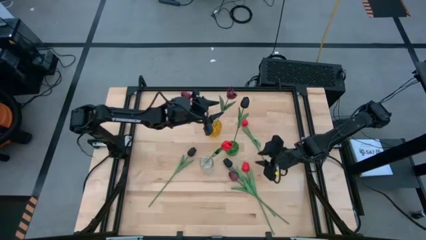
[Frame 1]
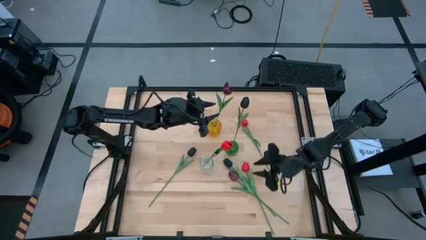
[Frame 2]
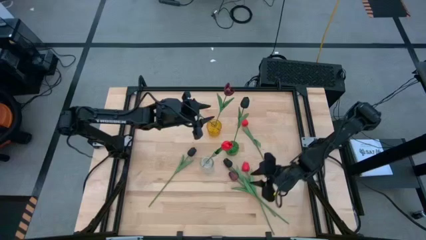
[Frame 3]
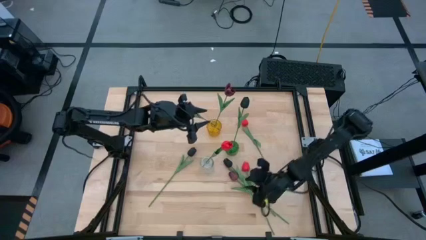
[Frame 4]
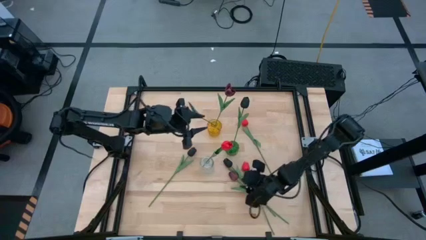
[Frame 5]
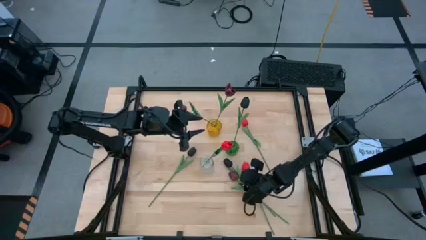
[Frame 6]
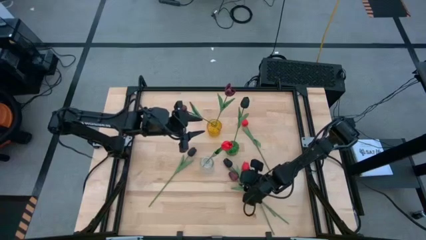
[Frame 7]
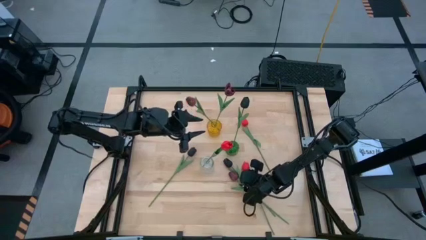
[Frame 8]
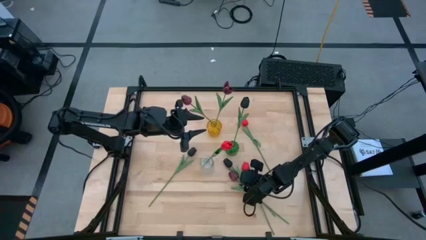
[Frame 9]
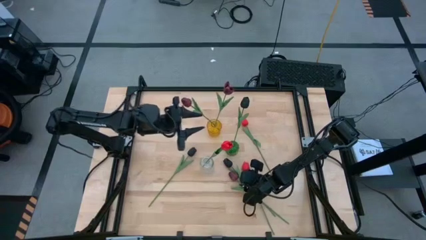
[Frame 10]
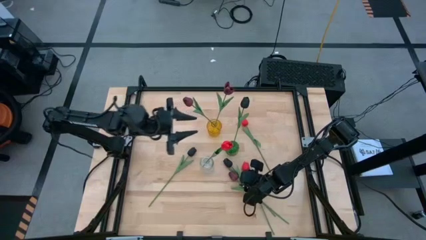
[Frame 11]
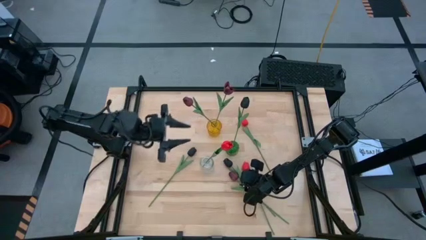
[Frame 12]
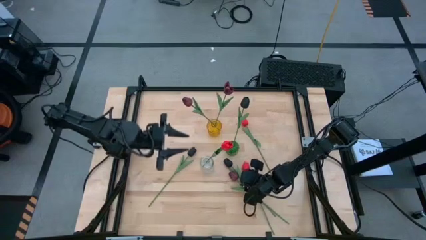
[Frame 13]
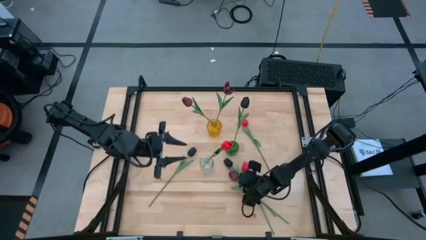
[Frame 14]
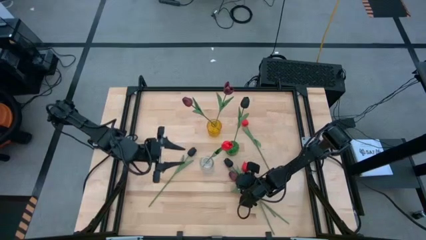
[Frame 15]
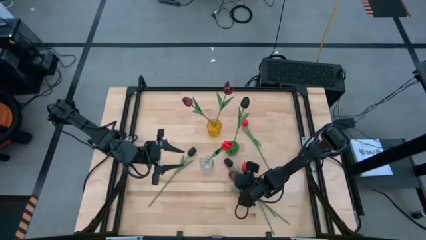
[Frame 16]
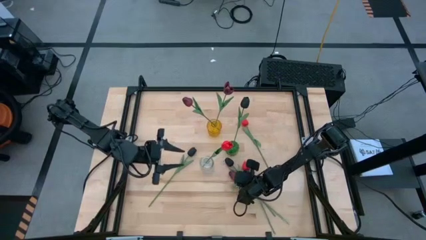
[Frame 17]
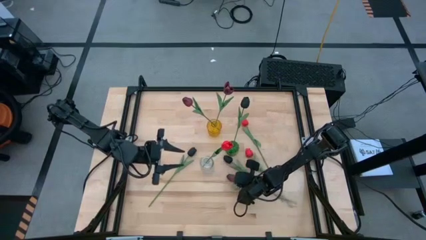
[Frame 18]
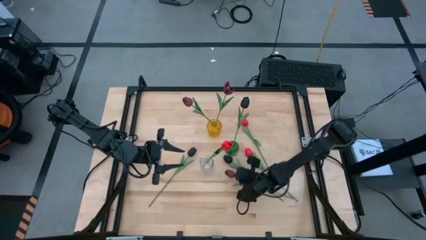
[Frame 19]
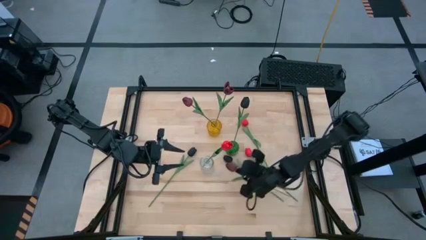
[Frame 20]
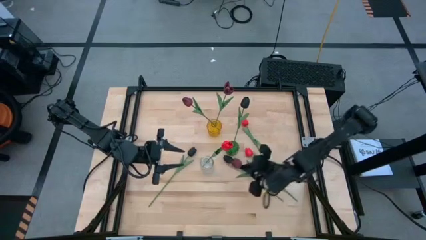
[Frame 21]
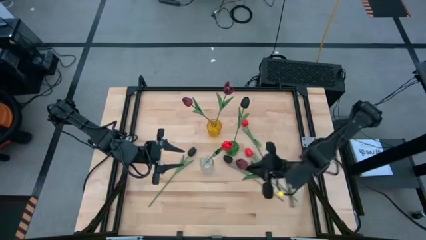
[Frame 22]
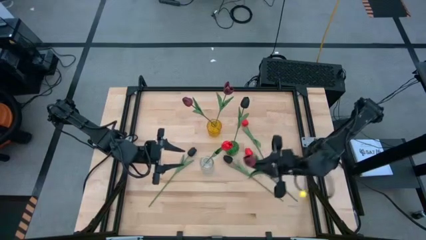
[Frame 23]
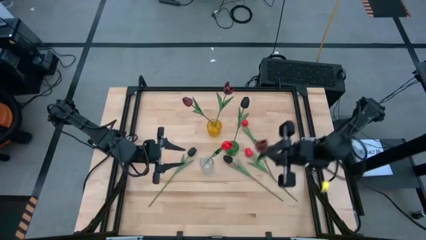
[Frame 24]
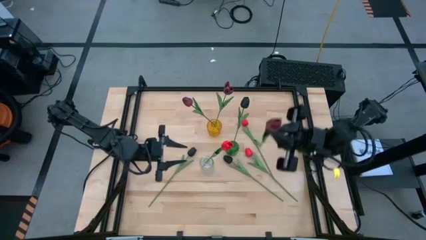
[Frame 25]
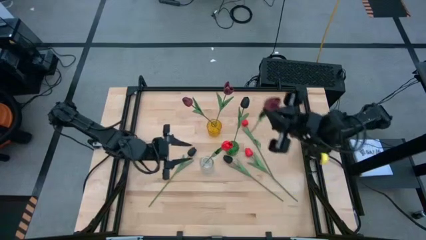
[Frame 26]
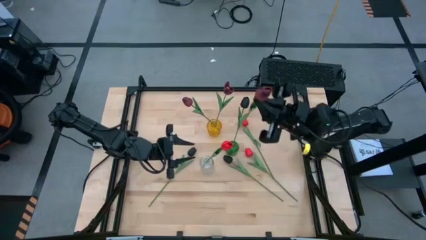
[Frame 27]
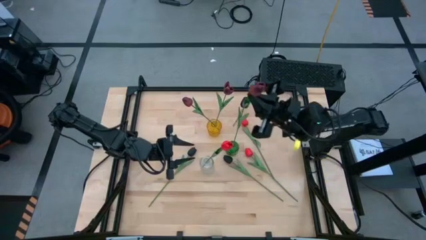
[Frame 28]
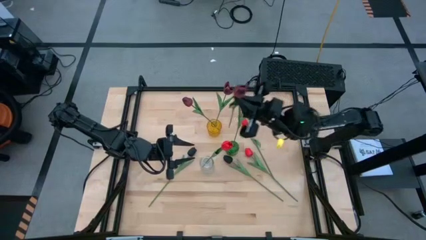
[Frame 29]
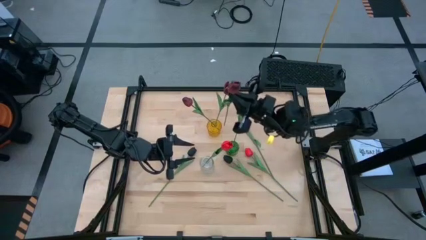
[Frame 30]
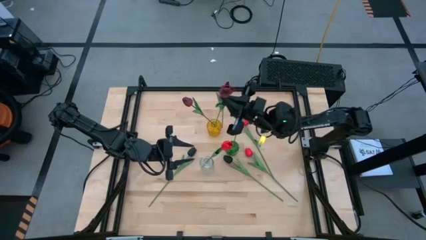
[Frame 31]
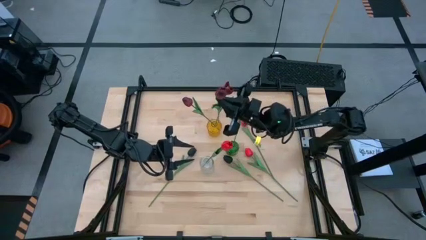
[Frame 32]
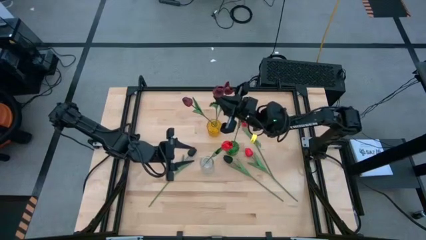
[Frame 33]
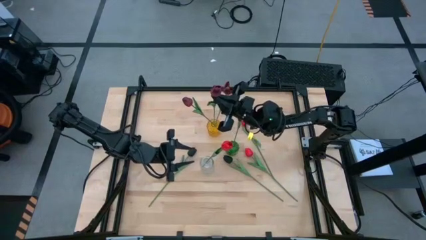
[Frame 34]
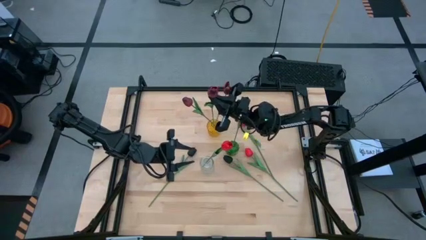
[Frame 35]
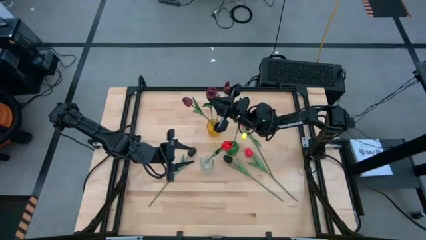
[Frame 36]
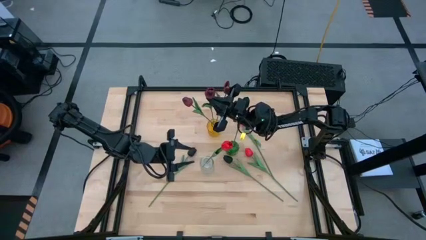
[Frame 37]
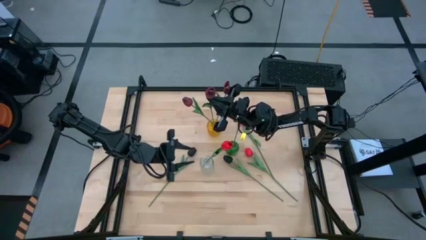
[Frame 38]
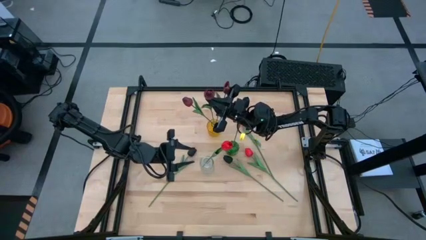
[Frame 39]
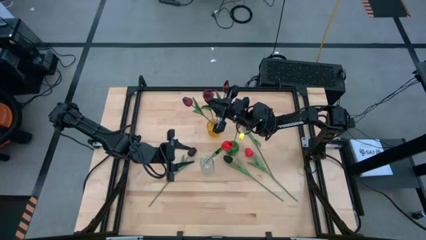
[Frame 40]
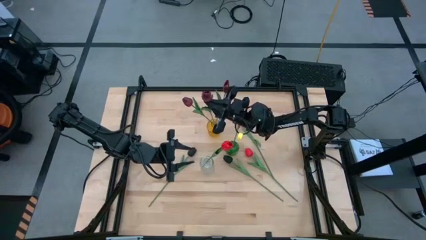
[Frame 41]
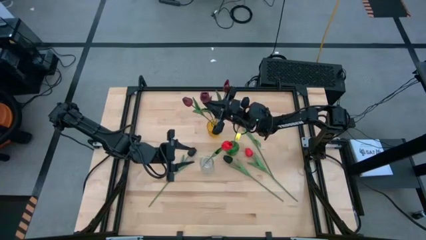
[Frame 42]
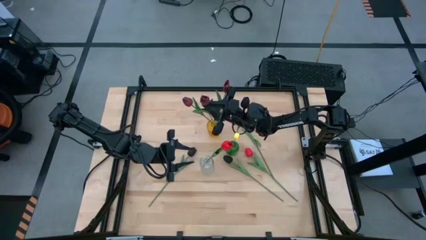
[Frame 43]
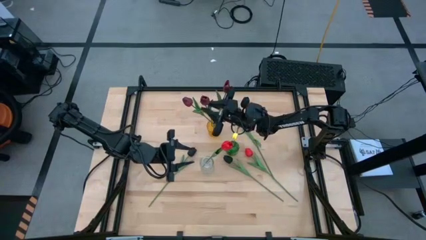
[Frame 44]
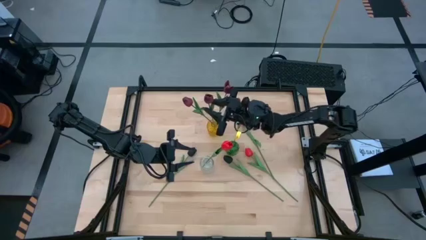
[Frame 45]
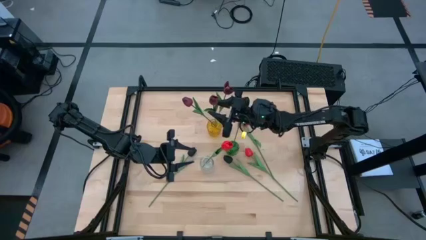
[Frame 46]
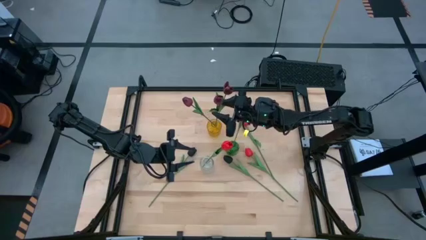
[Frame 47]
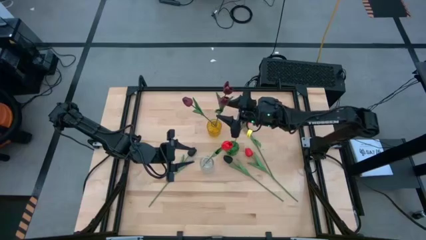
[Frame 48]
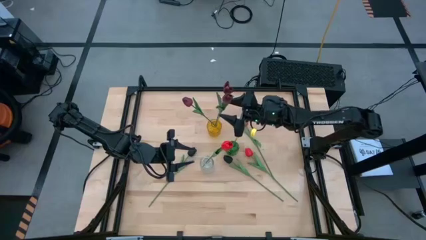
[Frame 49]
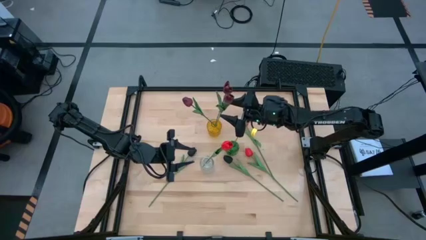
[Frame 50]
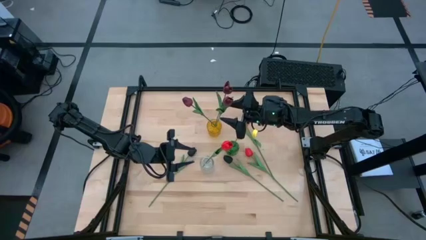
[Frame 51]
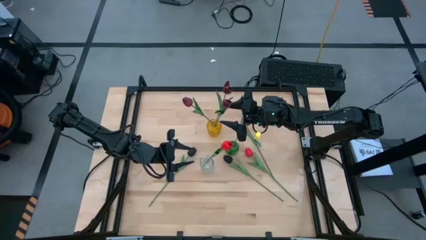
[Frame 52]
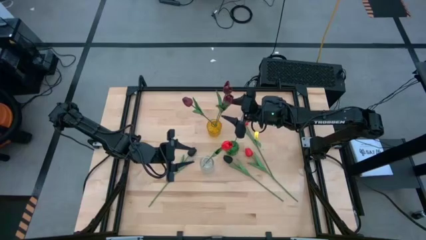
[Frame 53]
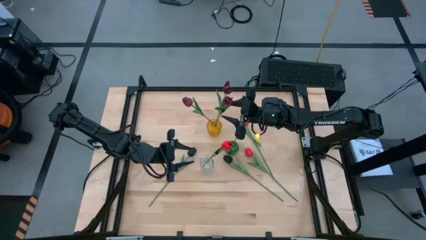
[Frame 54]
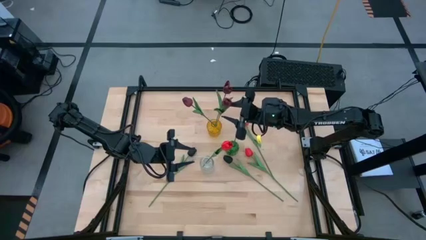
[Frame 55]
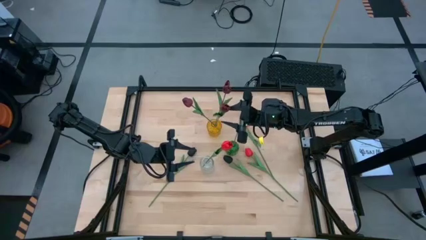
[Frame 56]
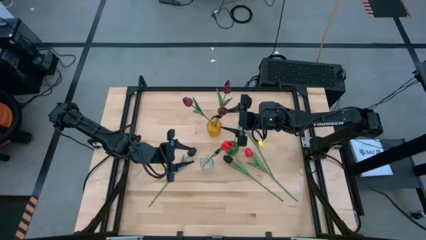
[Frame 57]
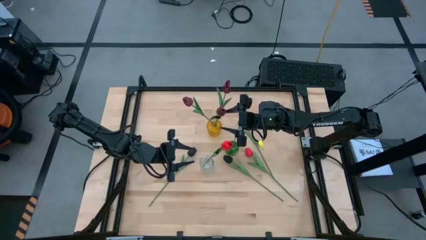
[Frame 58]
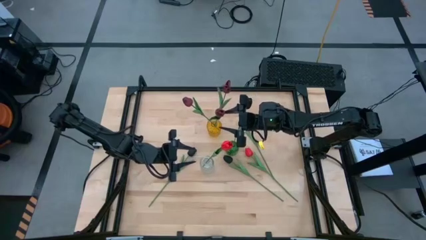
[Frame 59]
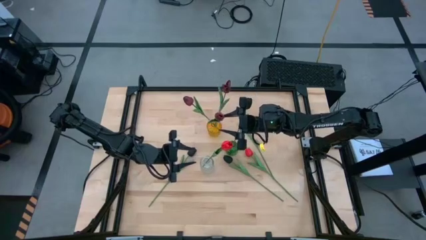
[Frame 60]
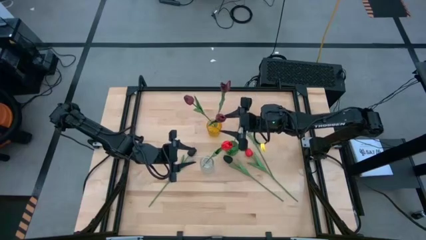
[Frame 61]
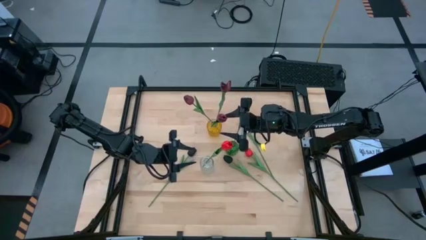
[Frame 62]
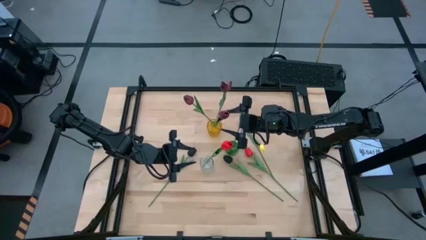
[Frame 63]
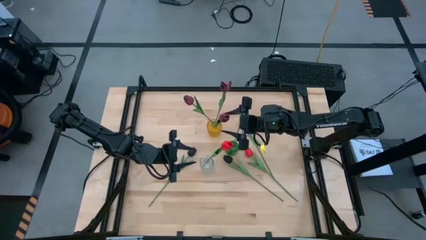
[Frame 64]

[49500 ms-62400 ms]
Task: Sort flowers into vase by color
Put the pink flower in the yellow flower vase
